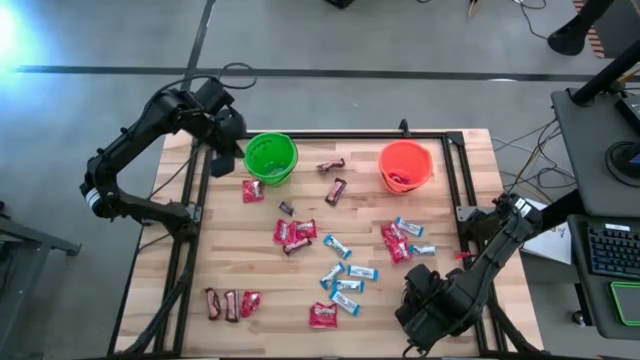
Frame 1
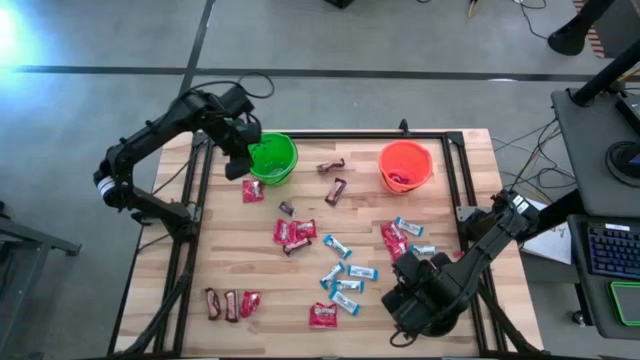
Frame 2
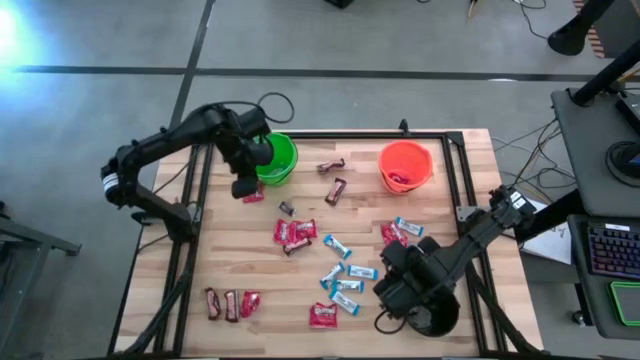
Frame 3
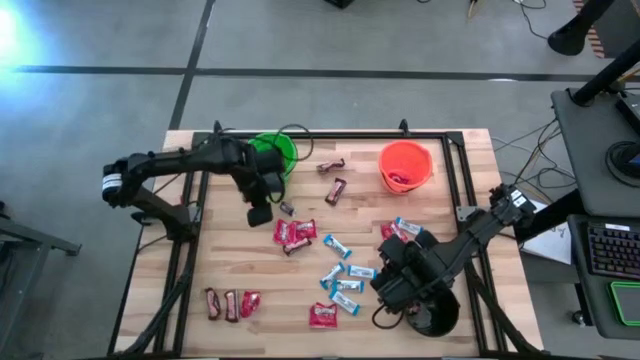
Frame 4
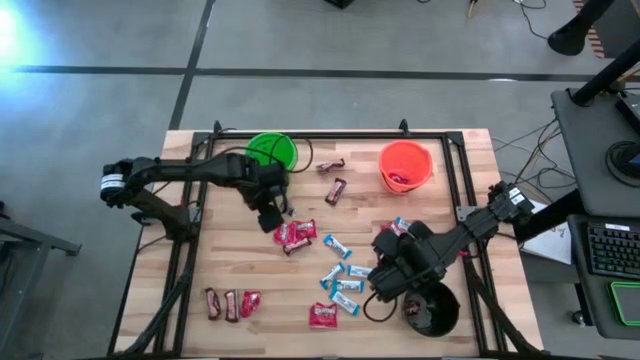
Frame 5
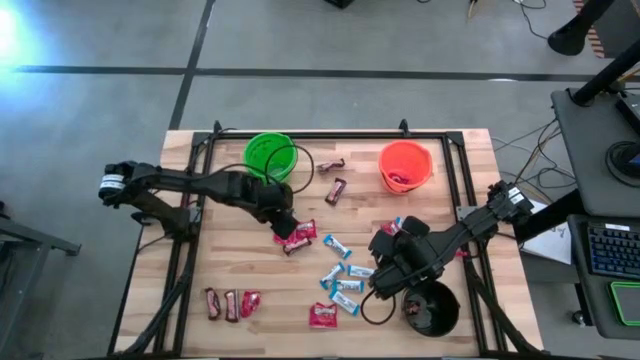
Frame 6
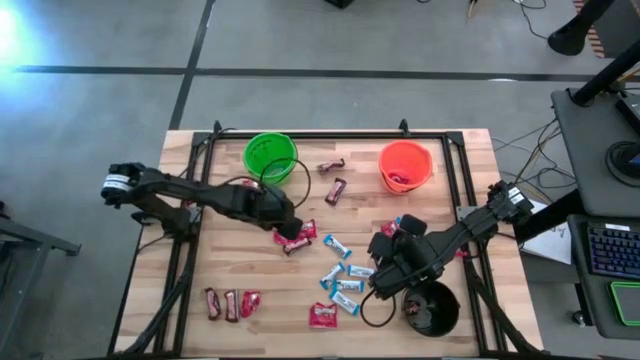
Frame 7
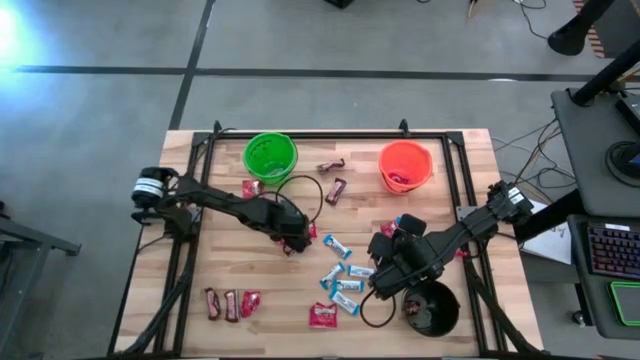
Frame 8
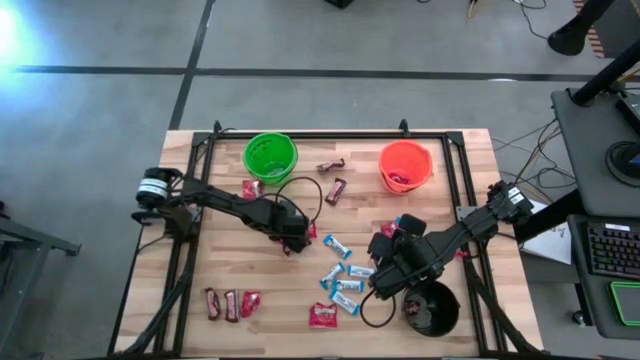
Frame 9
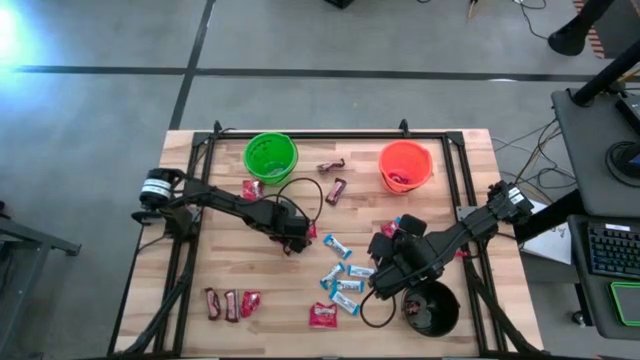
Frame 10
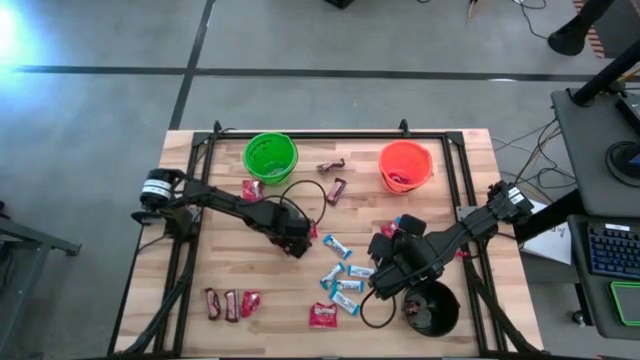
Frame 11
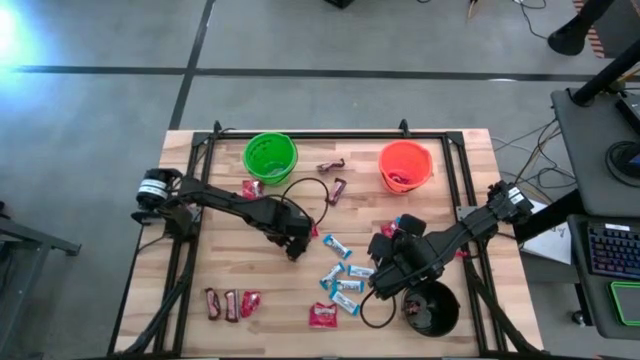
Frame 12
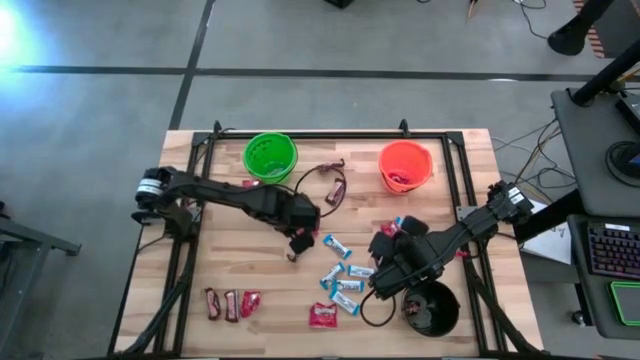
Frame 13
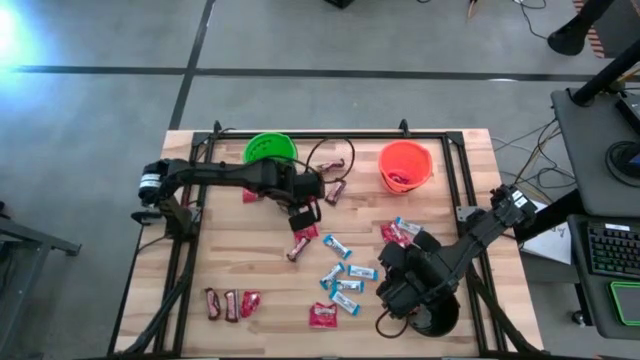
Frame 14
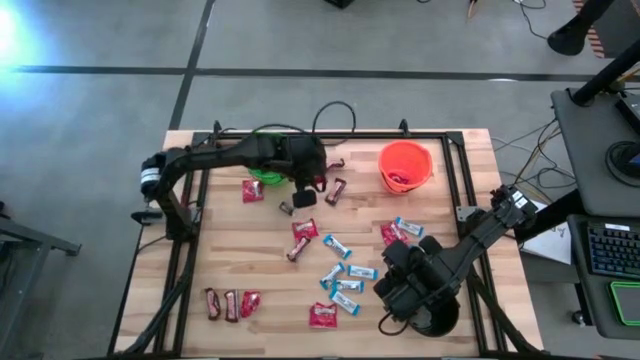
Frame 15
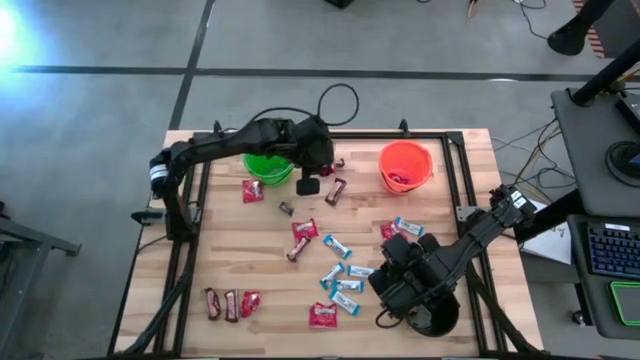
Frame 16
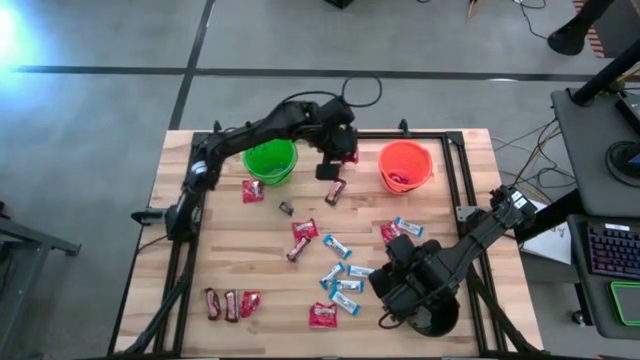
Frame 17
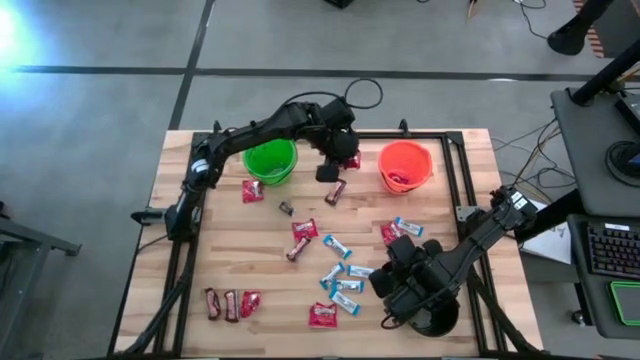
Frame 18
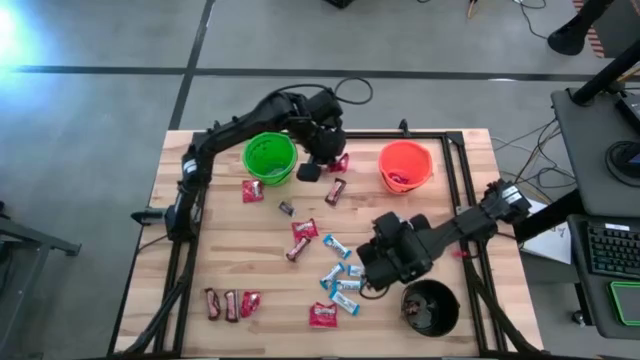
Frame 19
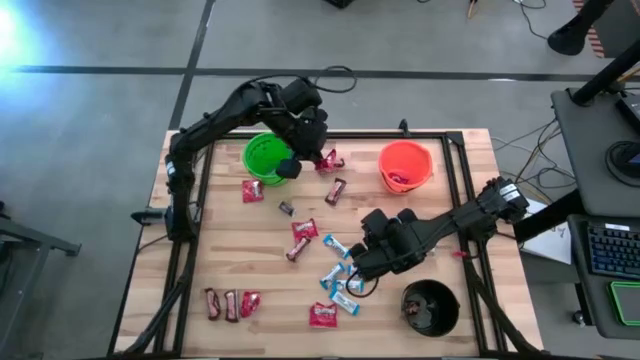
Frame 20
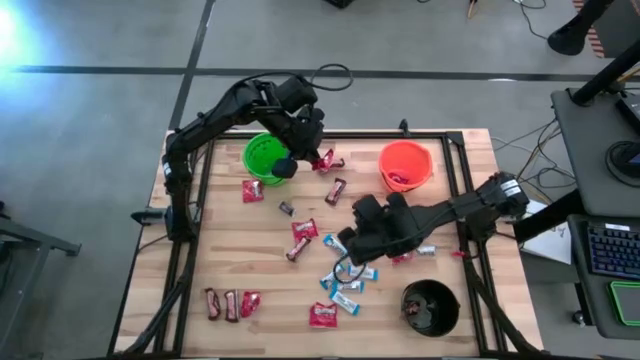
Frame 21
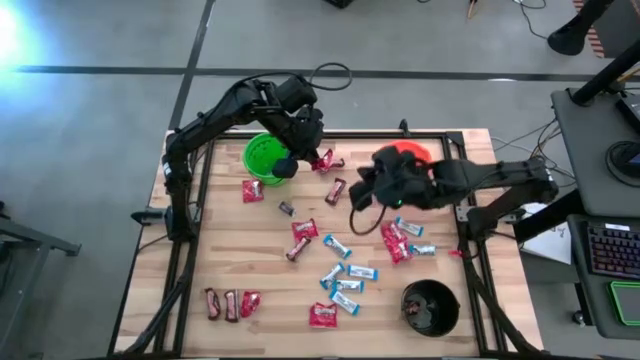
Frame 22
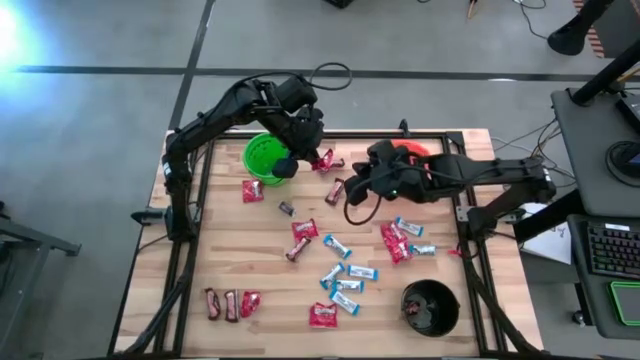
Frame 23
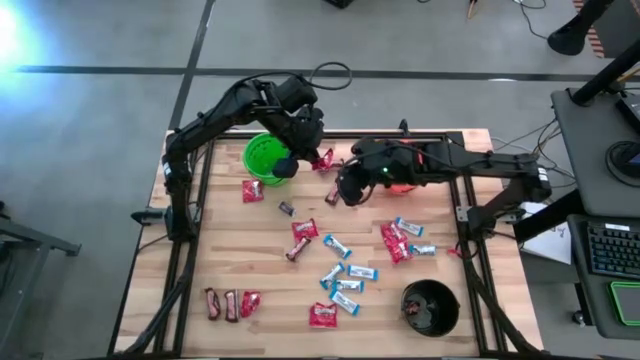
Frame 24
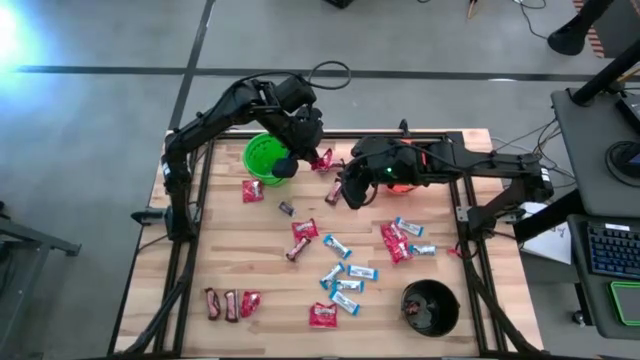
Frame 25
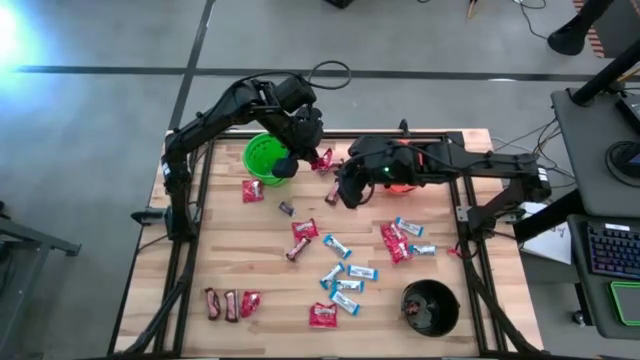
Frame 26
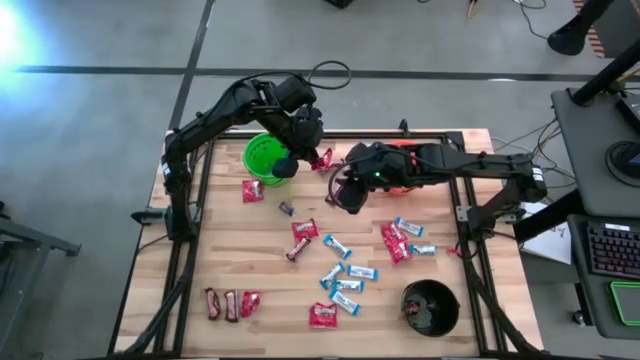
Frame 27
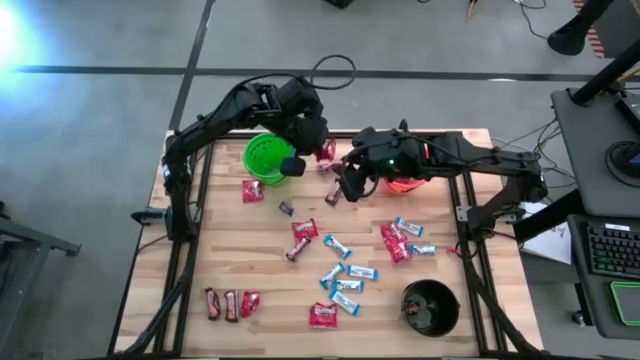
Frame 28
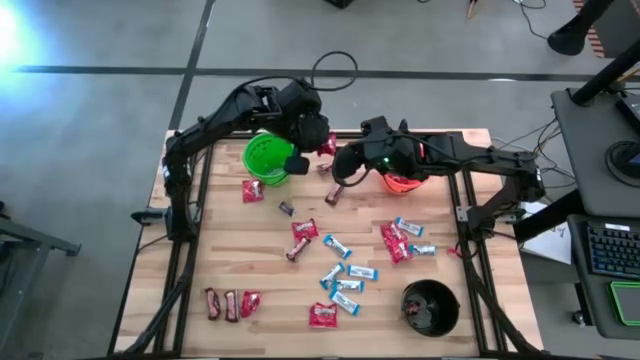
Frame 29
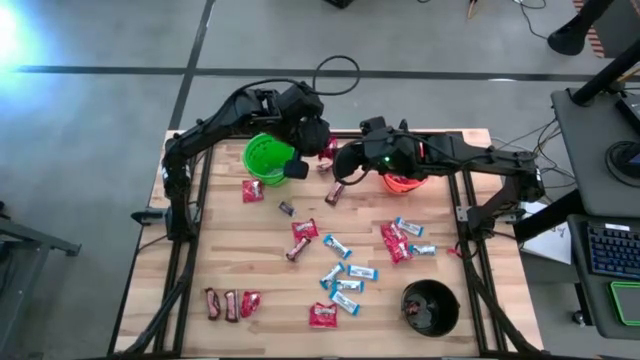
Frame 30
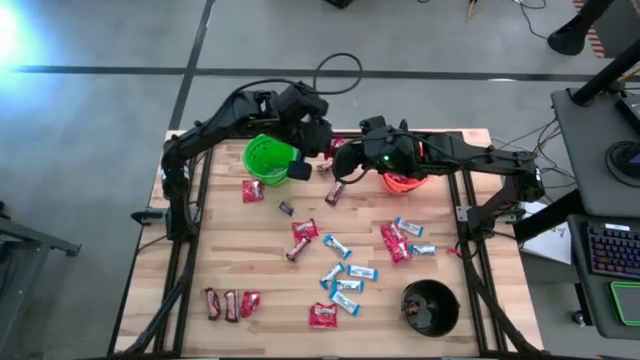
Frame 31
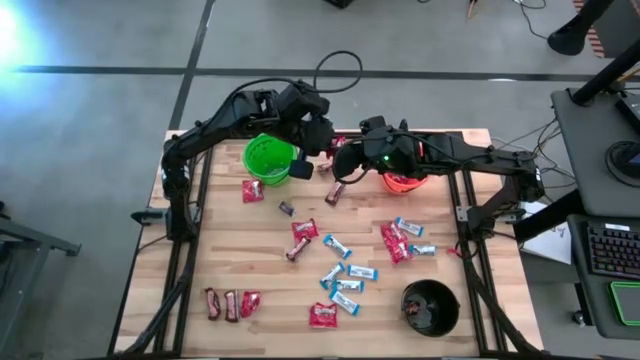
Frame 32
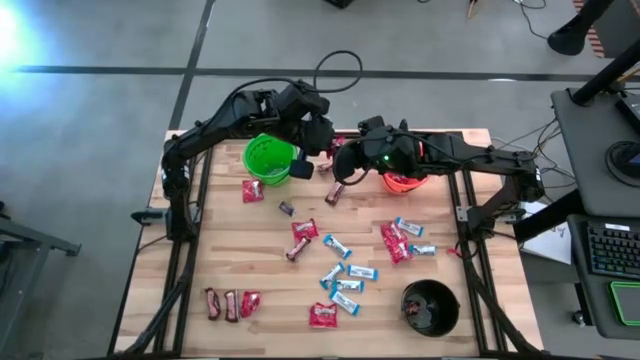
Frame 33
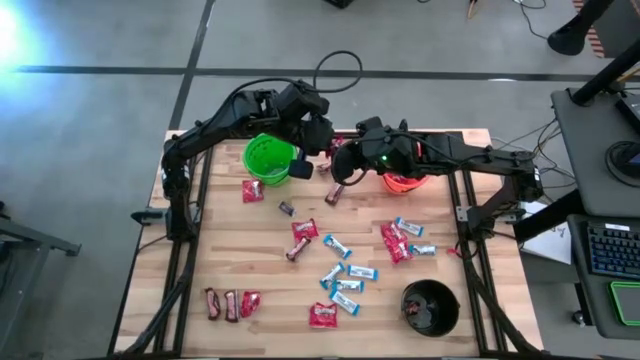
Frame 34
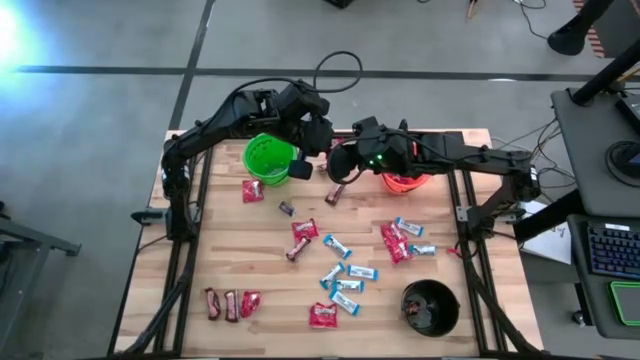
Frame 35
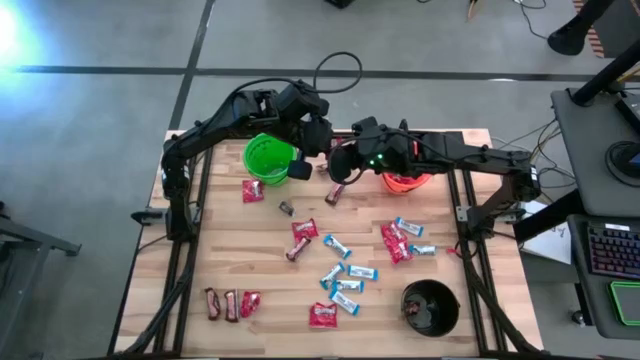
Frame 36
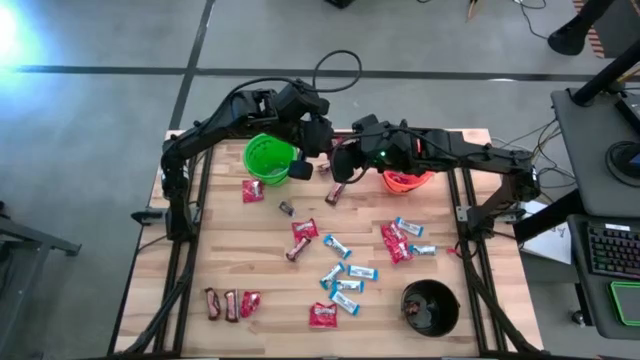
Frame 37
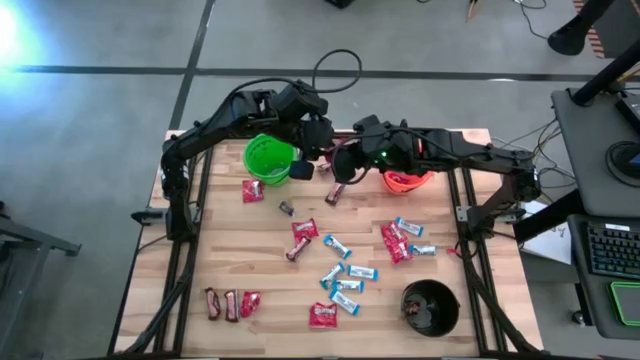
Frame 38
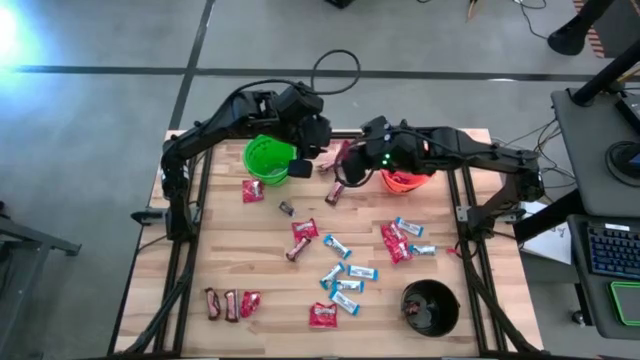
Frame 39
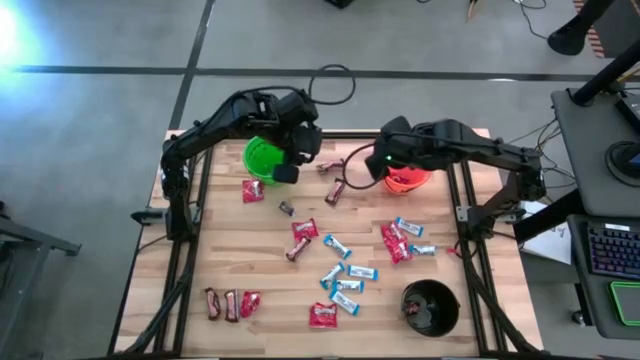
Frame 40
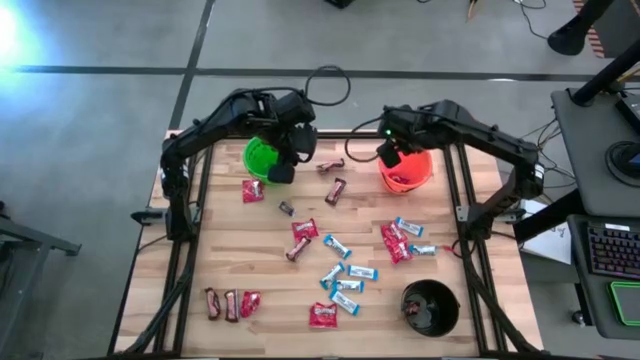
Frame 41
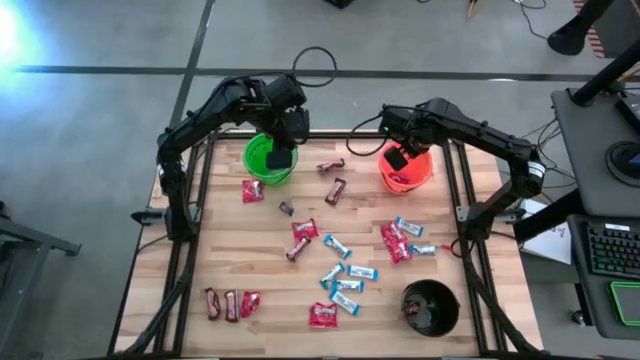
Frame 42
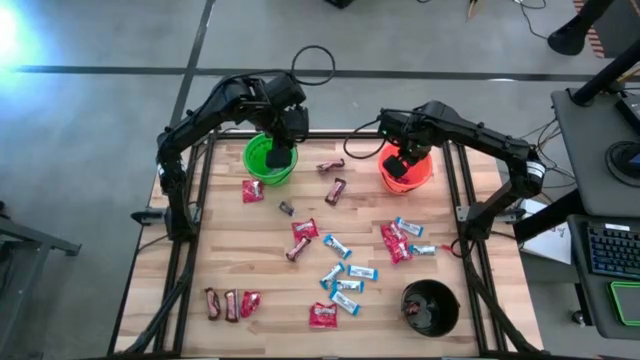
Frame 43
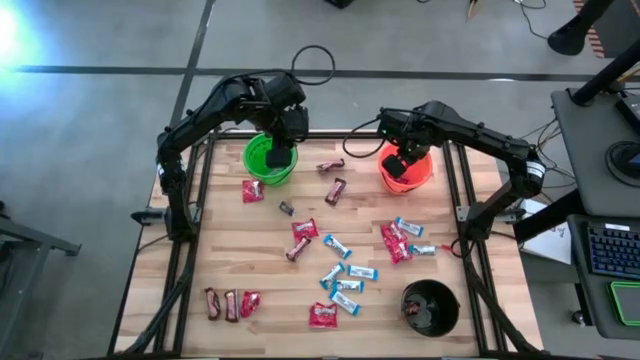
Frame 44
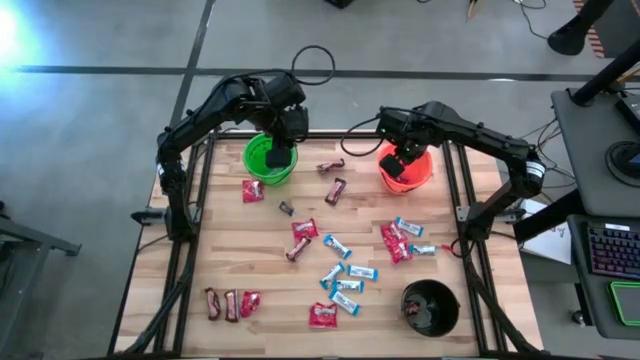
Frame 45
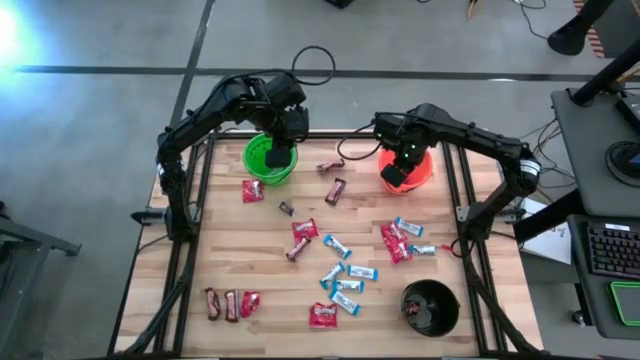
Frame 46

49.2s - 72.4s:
Task: Sort candy
Put the red candy into the orange bucket
